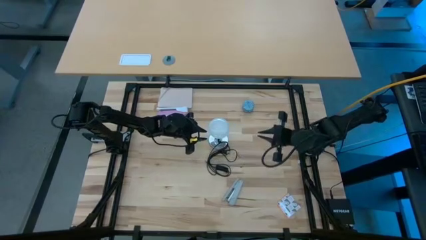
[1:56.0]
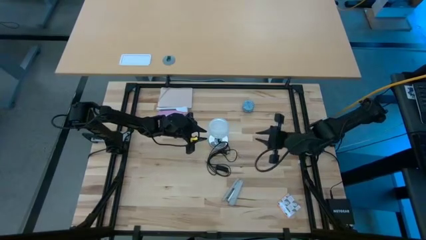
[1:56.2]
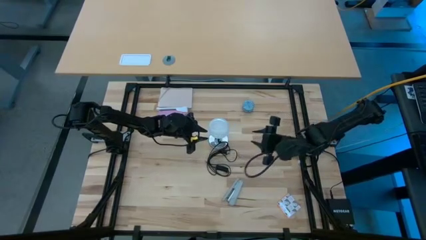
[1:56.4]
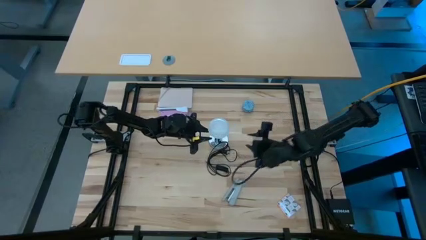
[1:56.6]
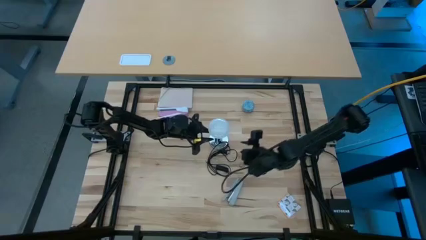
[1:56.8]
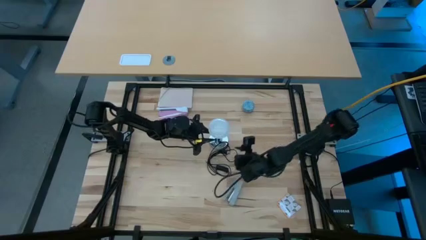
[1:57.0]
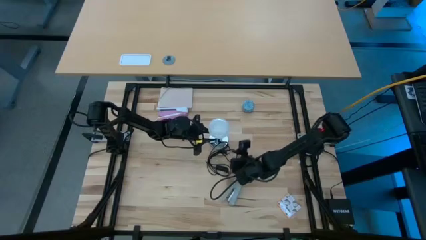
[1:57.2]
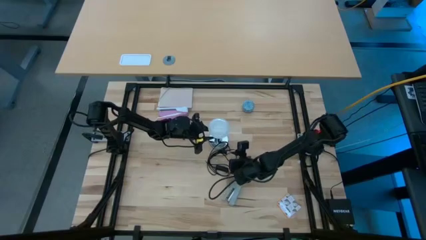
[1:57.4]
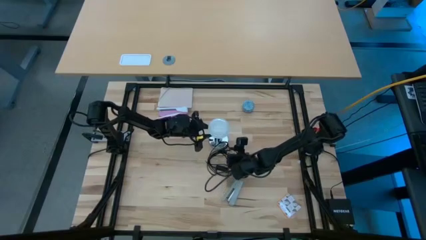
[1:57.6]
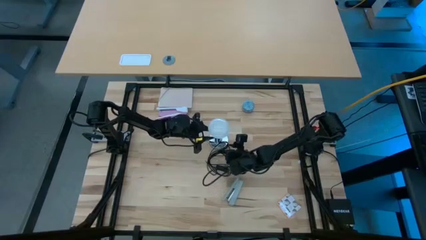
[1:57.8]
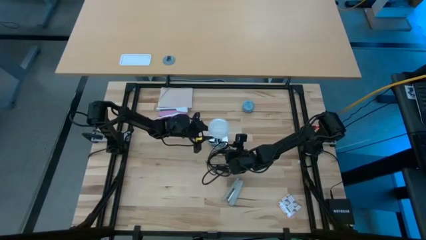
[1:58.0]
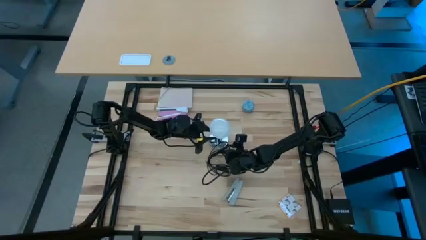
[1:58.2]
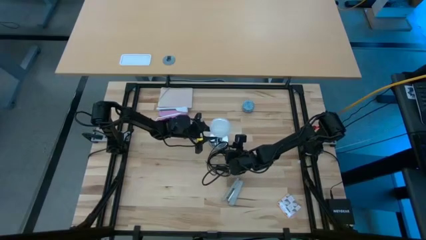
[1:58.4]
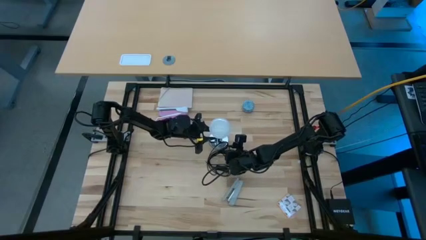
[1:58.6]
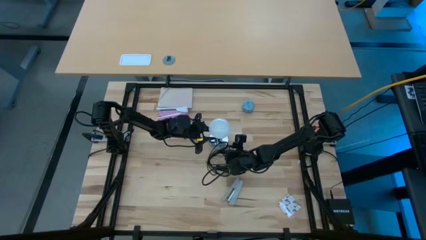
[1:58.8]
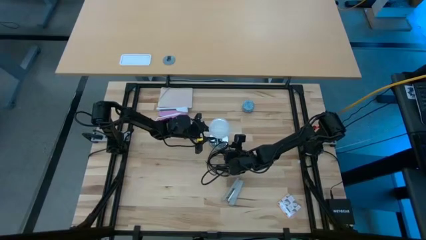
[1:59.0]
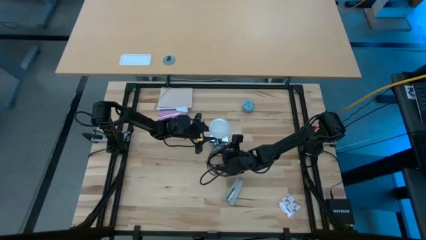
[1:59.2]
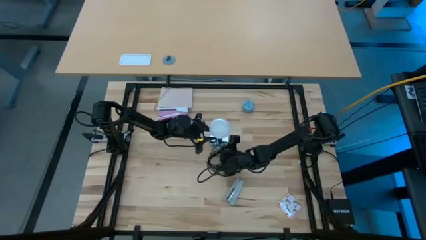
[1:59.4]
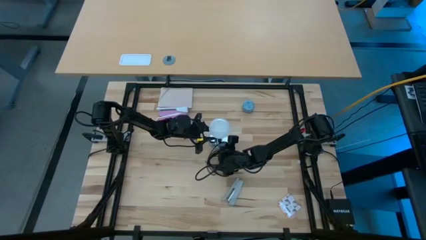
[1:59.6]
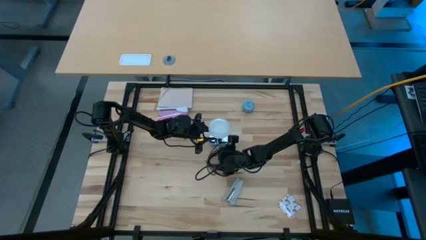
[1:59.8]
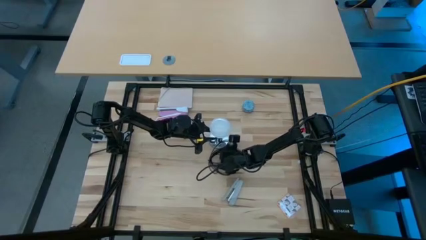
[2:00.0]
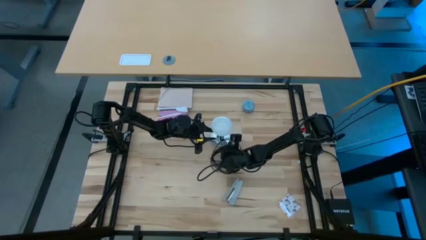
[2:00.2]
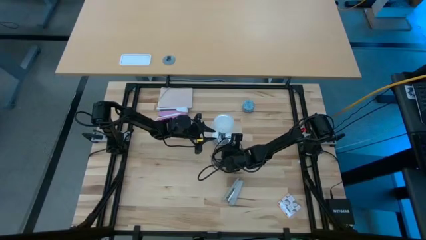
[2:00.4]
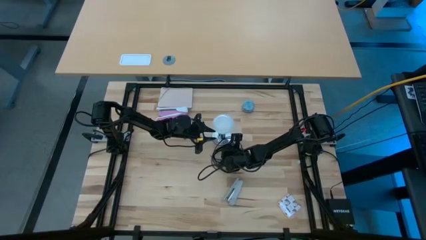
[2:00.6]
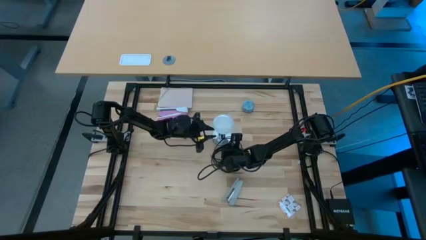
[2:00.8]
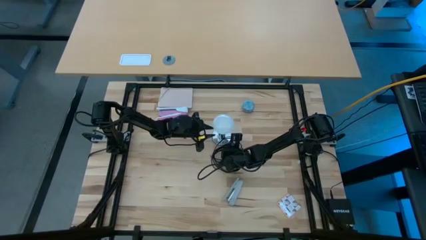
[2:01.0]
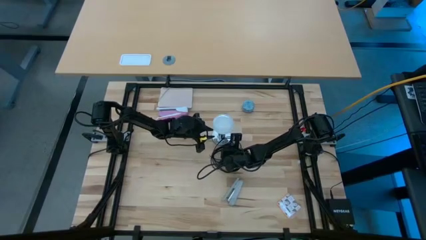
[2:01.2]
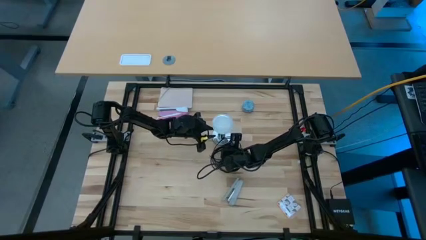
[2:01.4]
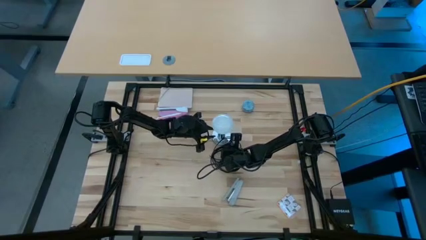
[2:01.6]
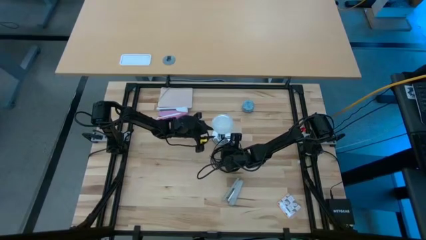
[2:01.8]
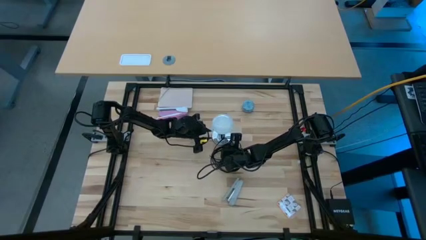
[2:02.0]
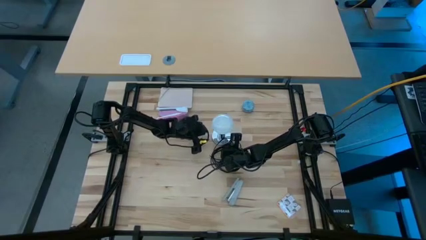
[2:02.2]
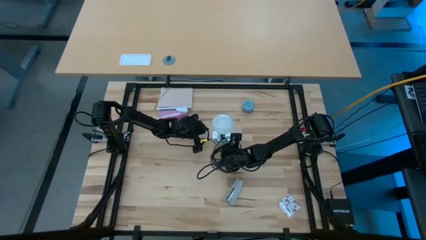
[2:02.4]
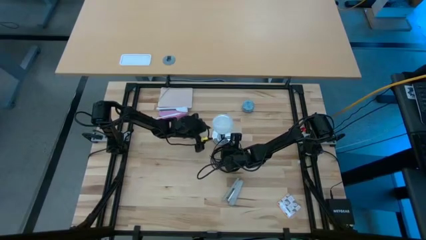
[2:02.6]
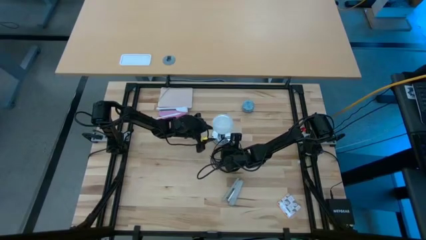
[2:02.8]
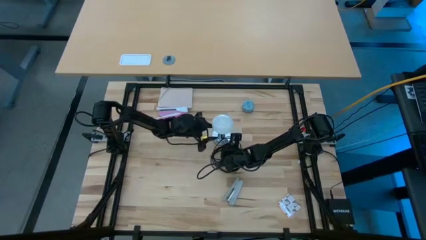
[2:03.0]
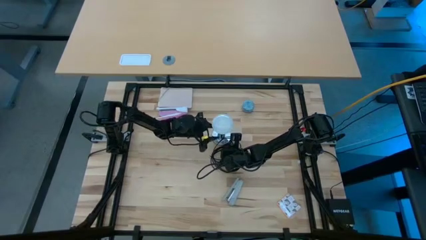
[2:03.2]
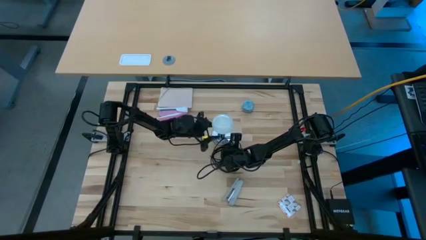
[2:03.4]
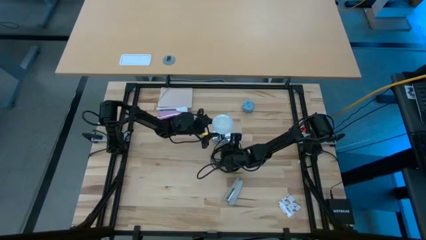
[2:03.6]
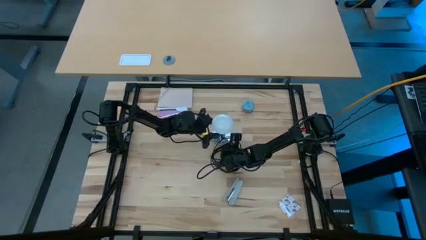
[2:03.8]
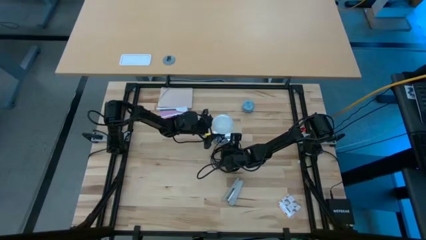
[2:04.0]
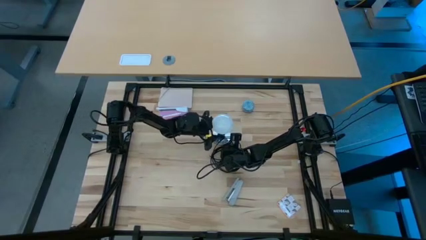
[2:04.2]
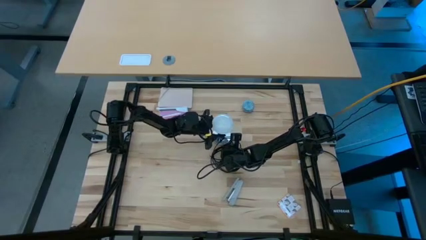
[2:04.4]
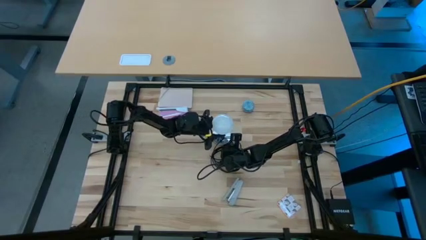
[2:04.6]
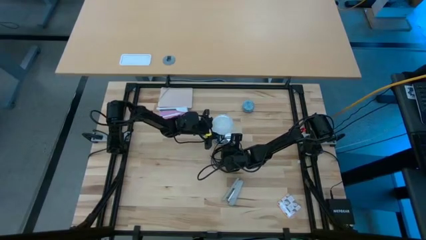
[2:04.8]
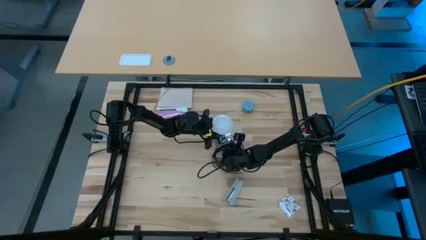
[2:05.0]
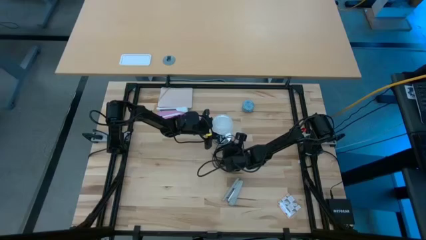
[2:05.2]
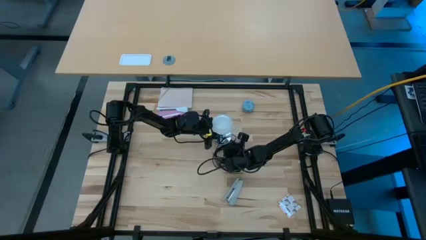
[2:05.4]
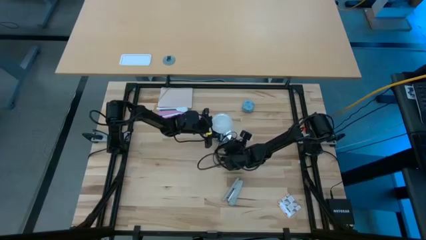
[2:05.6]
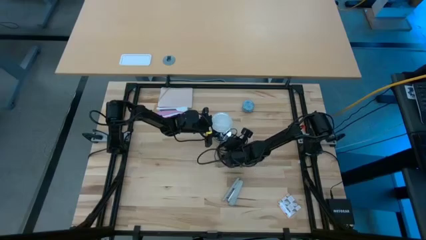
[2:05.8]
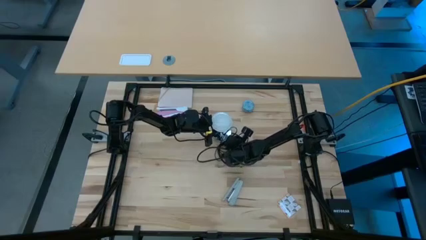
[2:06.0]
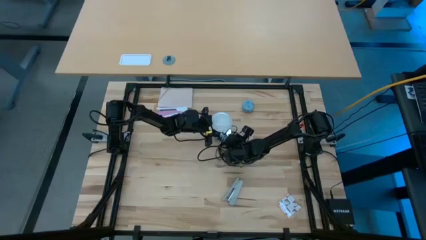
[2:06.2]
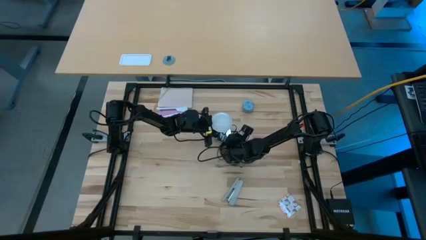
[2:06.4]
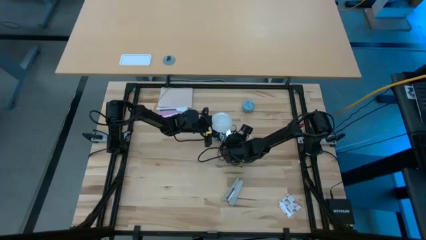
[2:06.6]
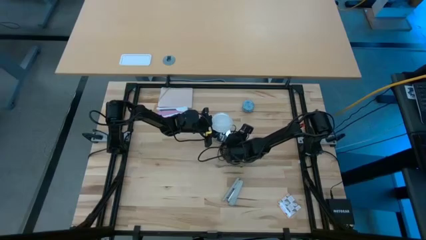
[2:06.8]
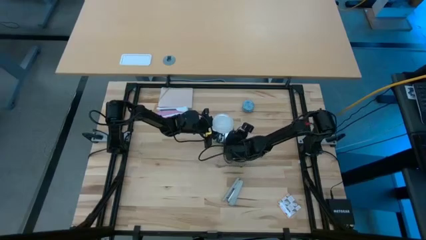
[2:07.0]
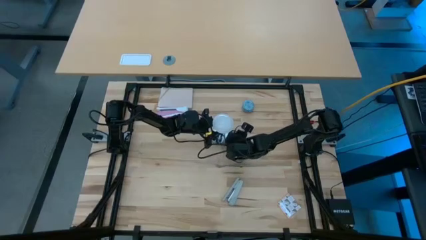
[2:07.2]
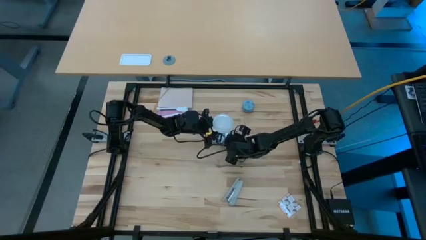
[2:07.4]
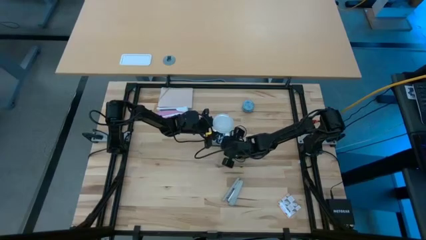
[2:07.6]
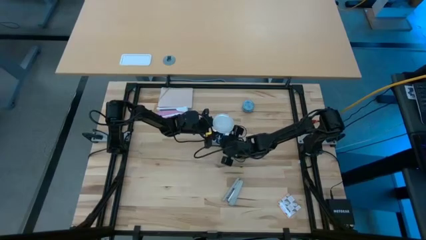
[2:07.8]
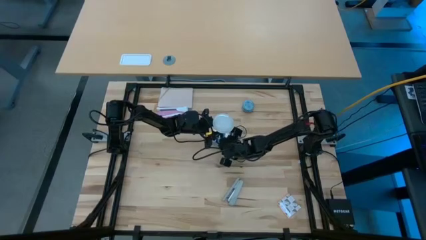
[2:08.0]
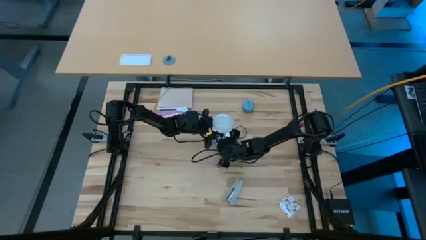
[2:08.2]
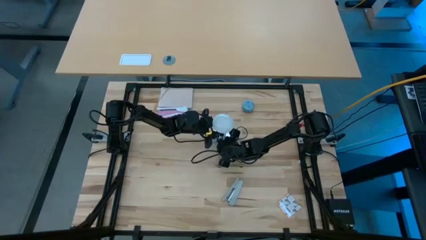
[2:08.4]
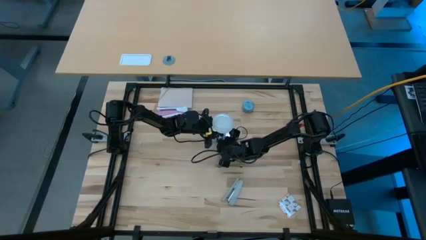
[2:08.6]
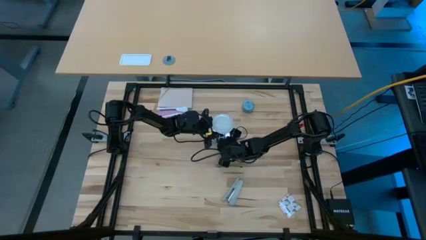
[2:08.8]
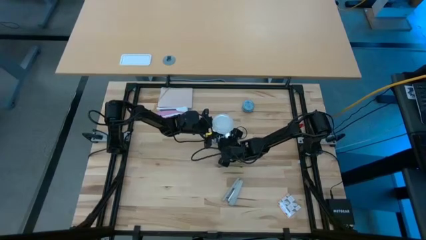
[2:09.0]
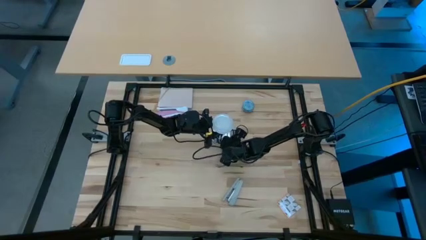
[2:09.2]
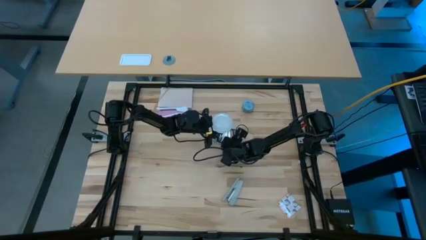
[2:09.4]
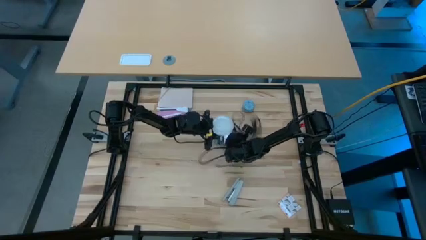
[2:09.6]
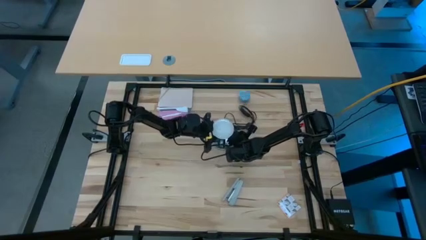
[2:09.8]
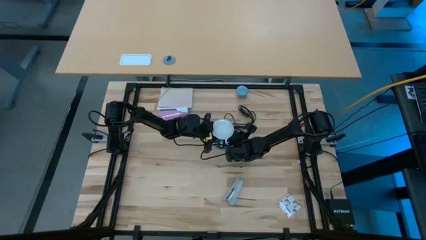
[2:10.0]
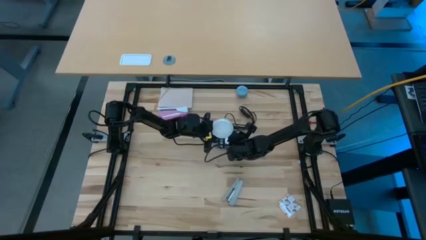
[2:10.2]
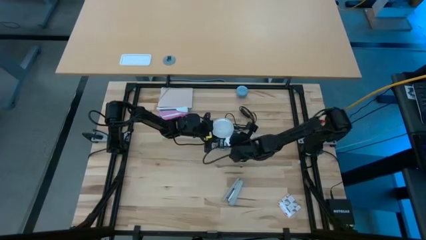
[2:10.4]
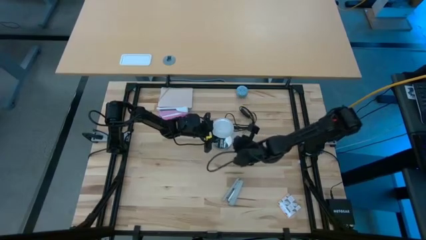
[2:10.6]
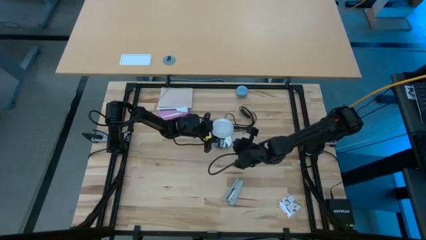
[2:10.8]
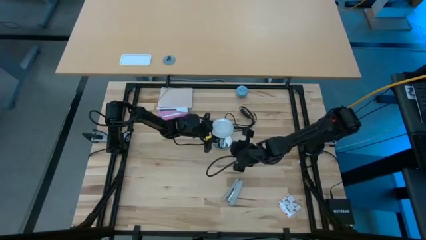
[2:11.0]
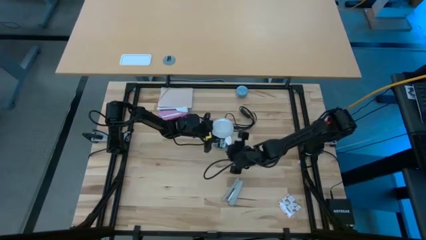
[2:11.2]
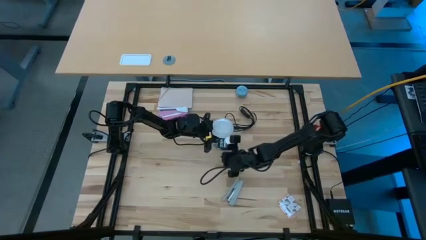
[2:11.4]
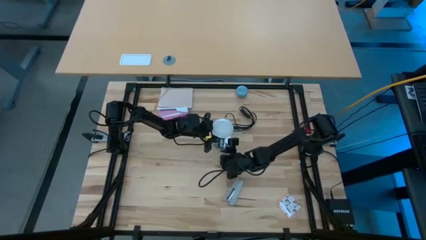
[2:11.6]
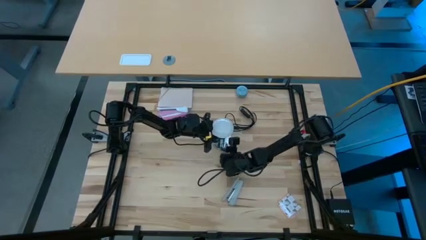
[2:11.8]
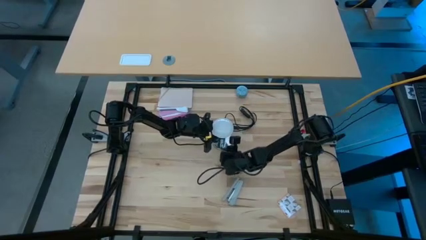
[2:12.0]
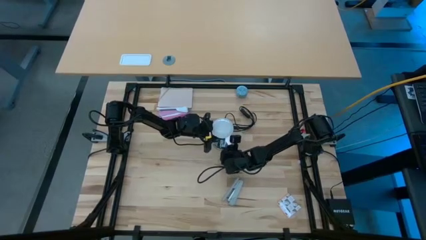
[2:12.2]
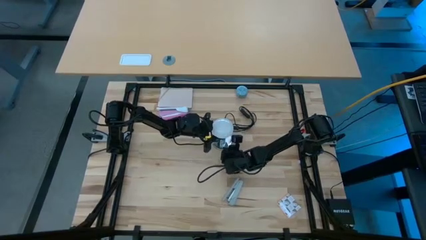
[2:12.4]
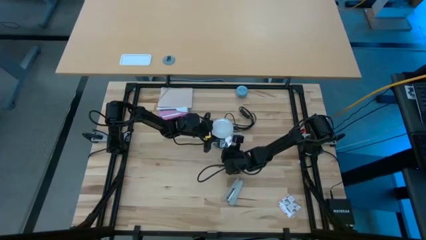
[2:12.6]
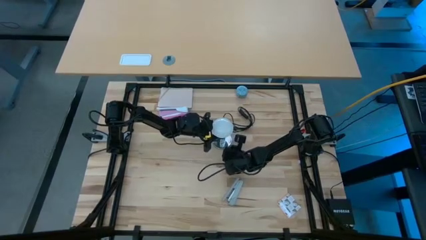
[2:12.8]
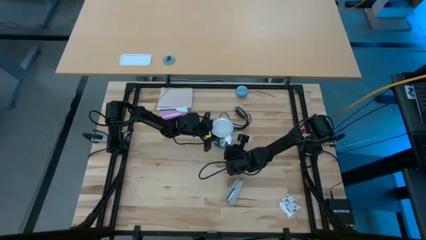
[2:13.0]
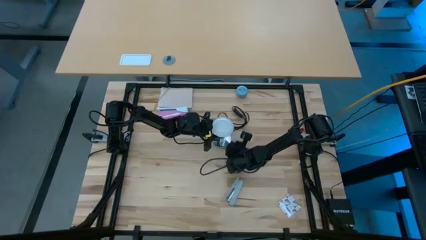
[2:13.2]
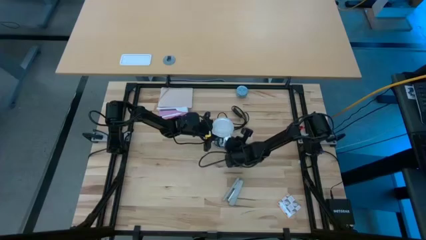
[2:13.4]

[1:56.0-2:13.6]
Task: Screw lightbulb
Insert light bulb into the lamp
